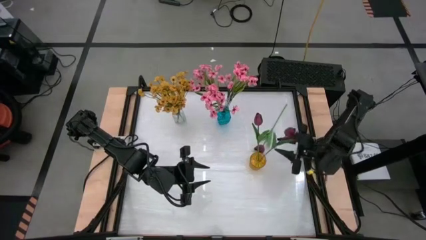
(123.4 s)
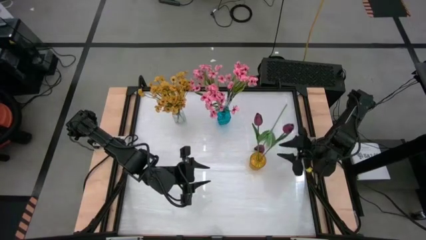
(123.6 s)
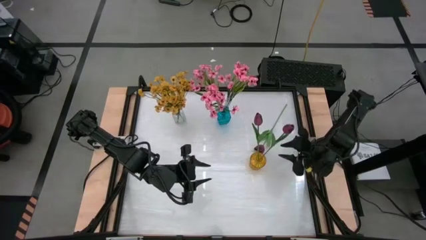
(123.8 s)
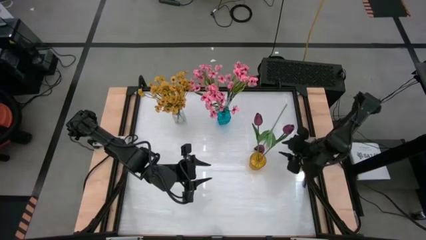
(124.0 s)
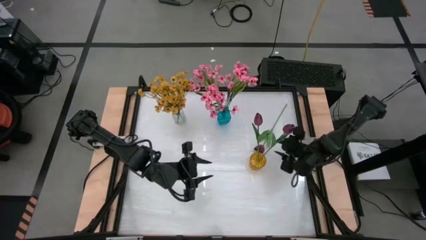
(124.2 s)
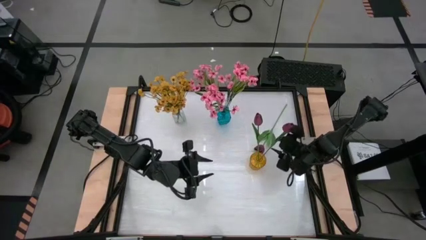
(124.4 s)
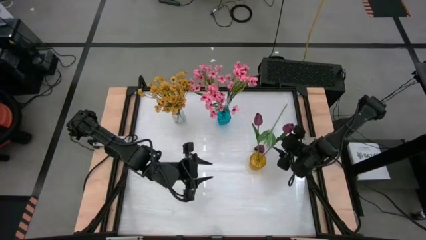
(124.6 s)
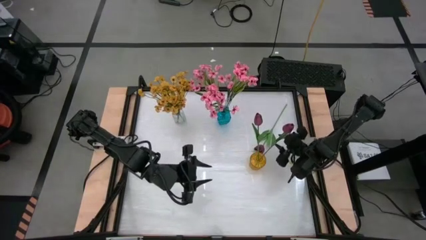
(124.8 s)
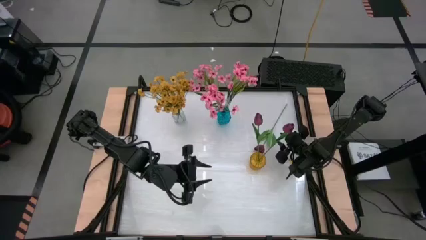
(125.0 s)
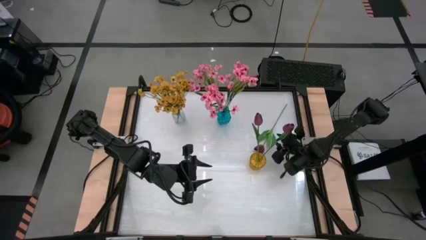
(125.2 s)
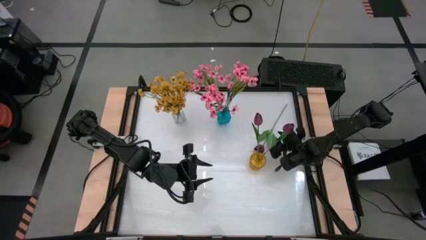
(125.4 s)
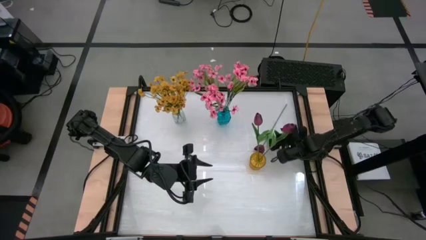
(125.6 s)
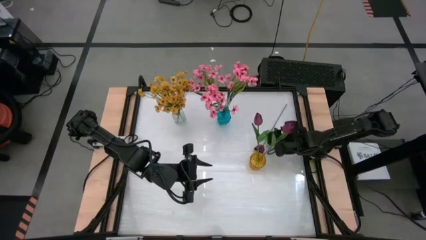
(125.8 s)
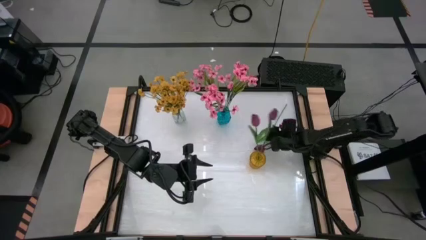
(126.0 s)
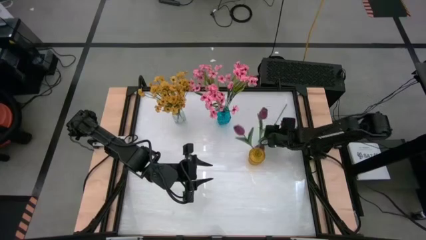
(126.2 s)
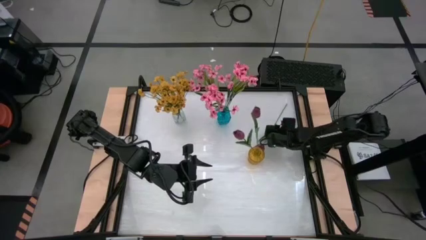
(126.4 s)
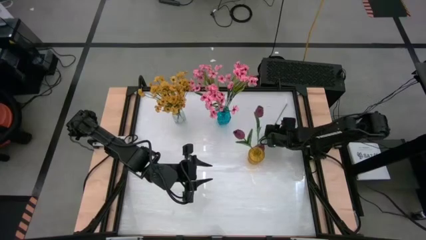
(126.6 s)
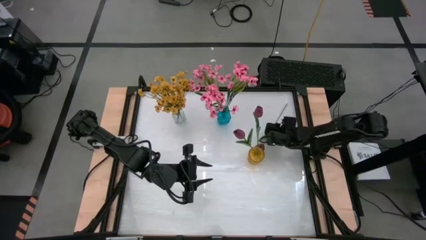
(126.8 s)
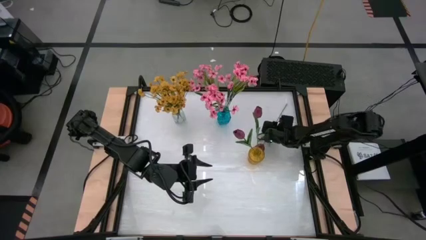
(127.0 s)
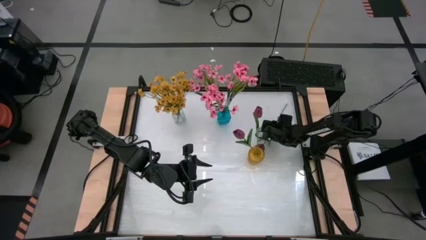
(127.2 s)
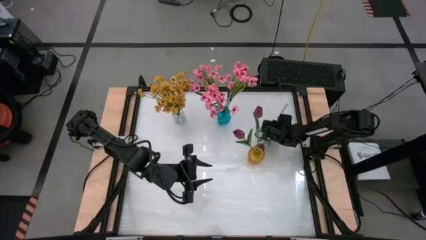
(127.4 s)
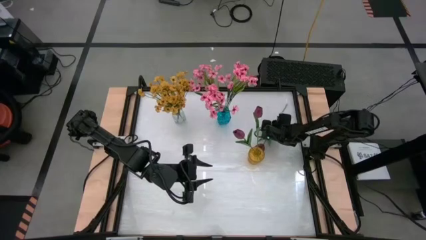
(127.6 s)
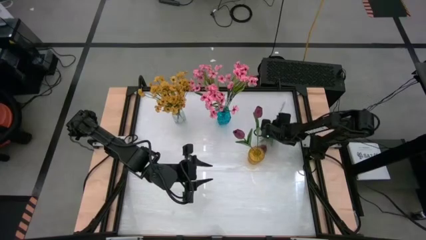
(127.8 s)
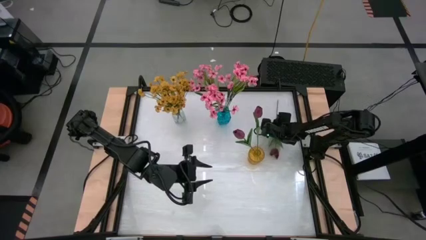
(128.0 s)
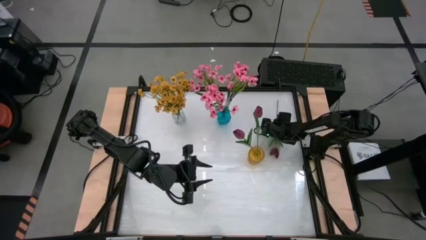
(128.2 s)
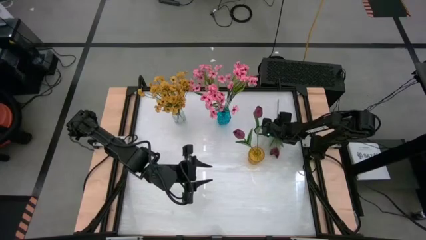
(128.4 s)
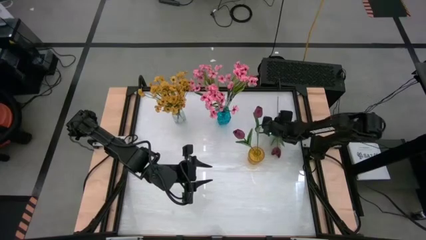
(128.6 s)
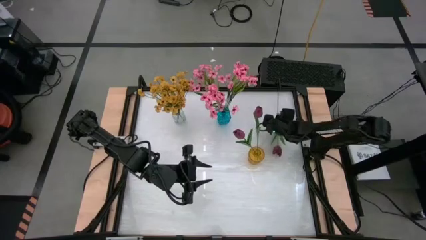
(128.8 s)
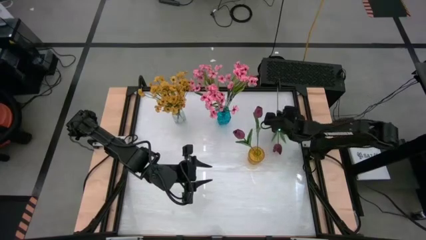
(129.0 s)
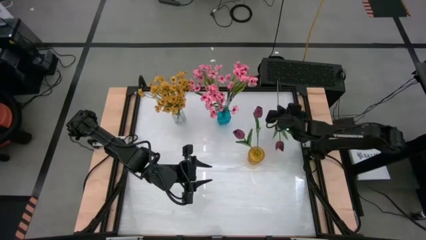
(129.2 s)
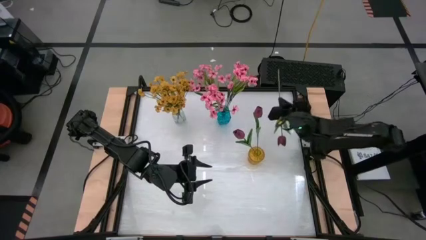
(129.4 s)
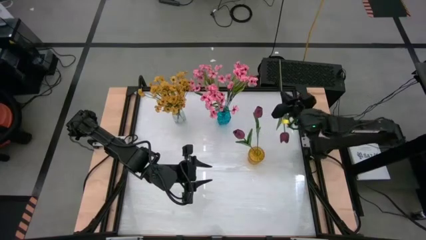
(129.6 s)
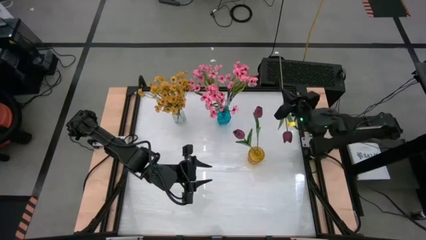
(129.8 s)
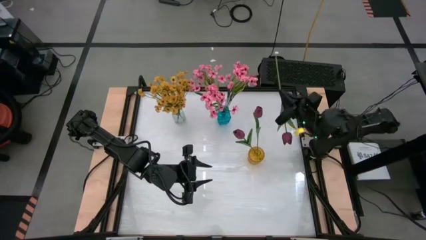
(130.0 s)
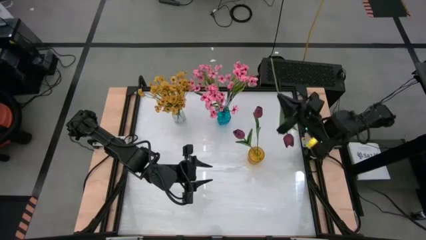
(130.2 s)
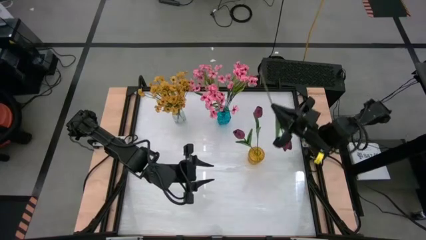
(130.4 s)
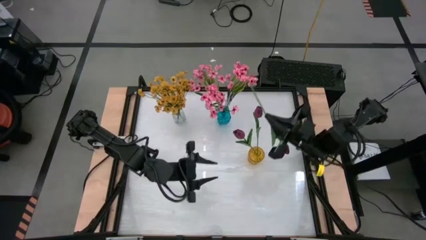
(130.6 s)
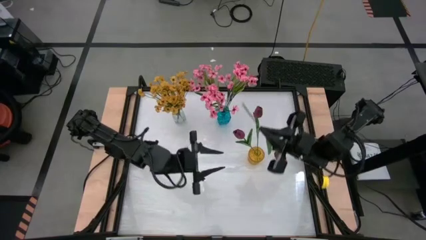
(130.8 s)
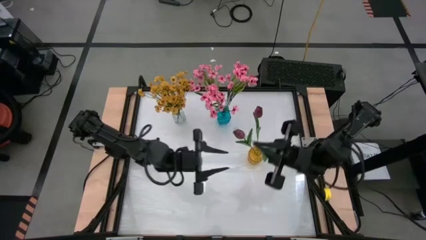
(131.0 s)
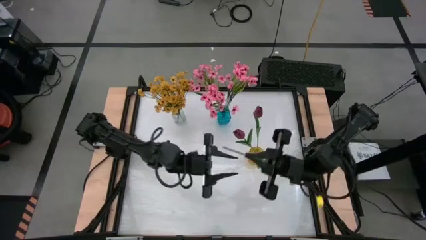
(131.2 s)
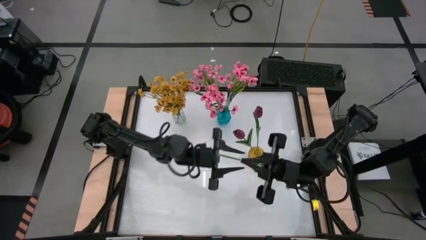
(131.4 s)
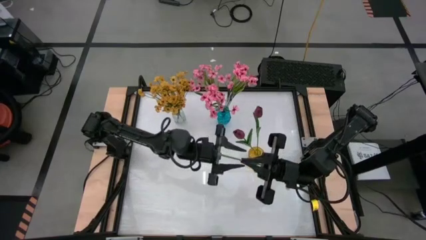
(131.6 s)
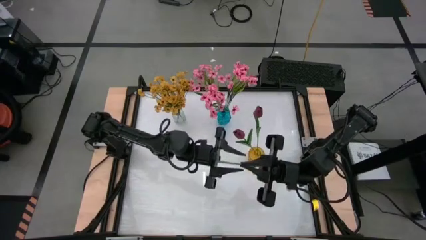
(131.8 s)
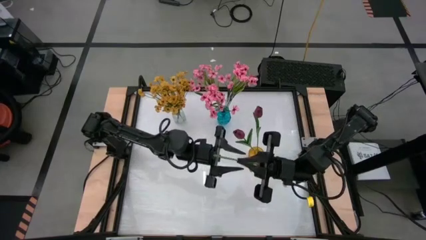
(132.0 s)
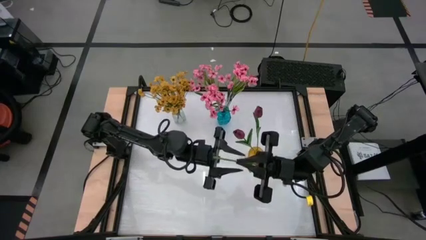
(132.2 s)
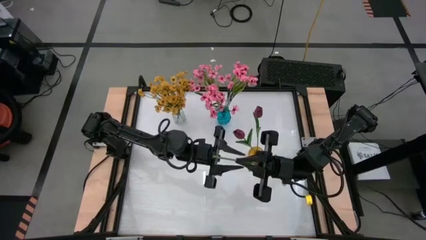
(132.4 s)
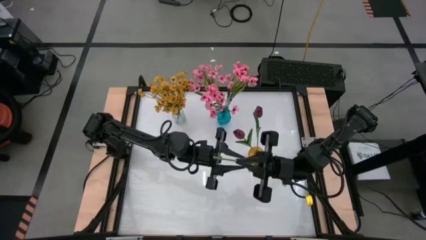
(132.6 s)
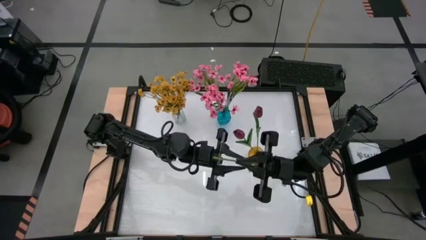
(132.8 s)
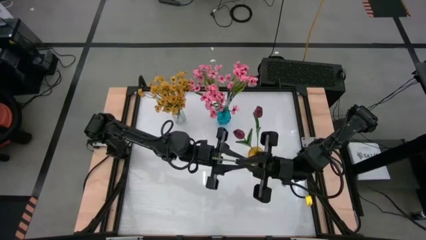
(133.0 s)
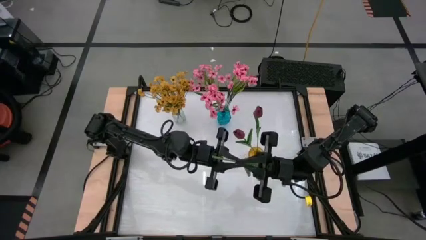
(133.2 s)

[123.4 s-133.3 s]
Task: Sort flowers into vase by color
Put the red flower into the yellow vase

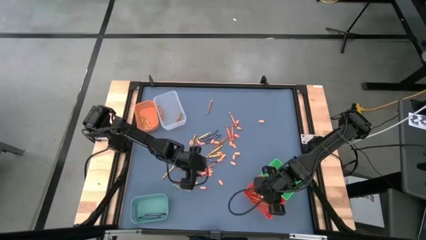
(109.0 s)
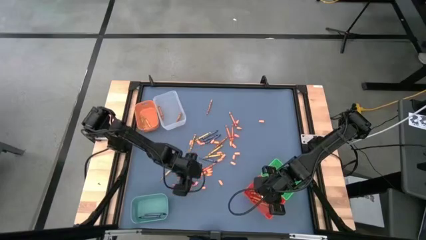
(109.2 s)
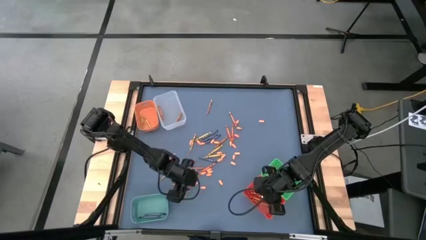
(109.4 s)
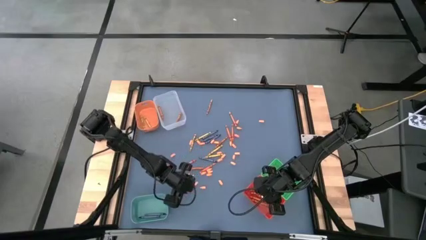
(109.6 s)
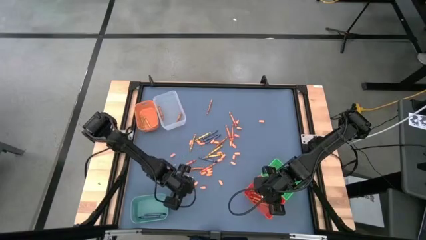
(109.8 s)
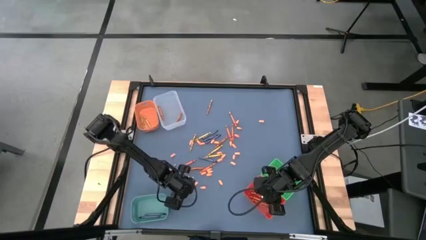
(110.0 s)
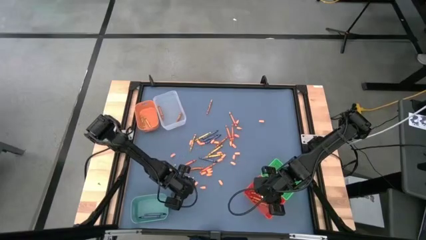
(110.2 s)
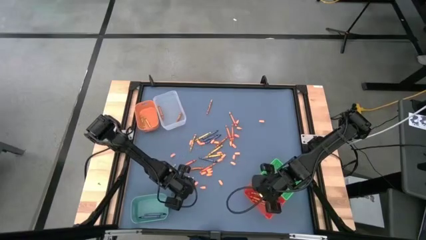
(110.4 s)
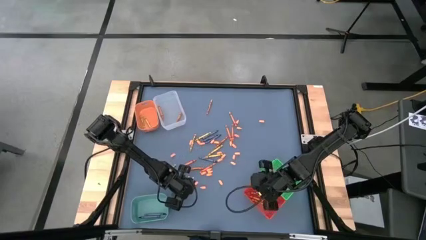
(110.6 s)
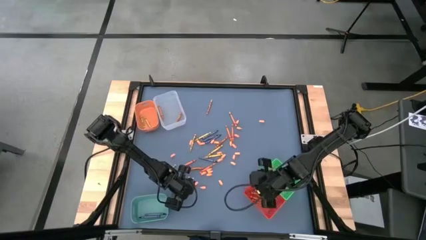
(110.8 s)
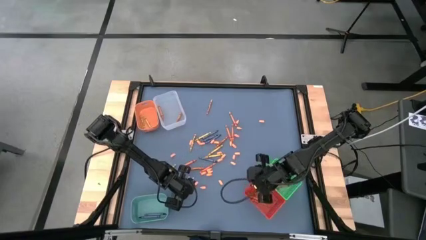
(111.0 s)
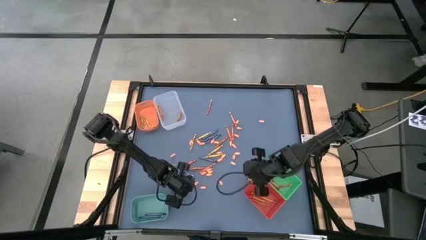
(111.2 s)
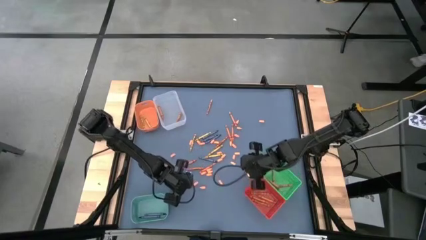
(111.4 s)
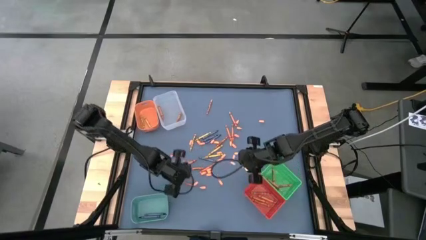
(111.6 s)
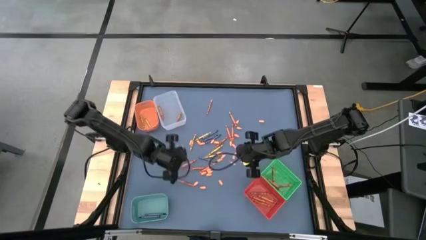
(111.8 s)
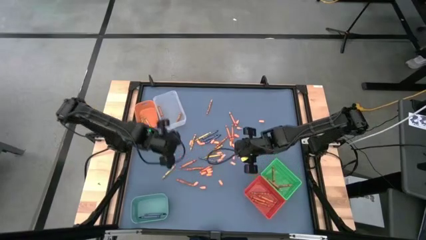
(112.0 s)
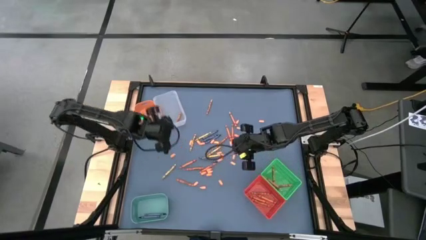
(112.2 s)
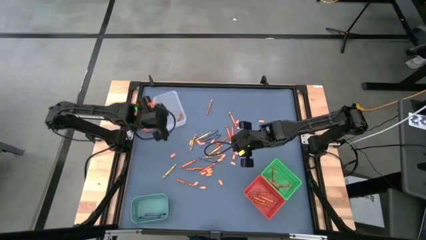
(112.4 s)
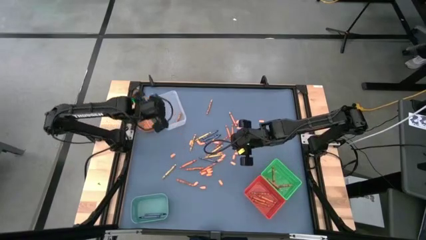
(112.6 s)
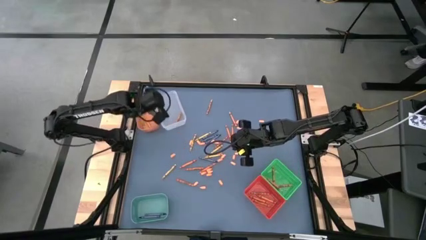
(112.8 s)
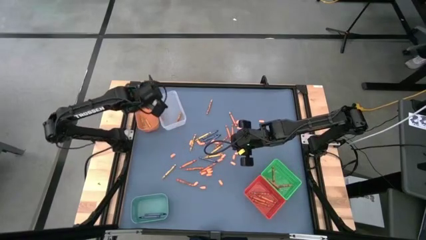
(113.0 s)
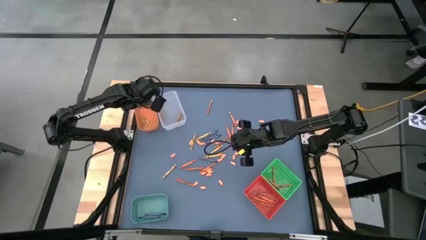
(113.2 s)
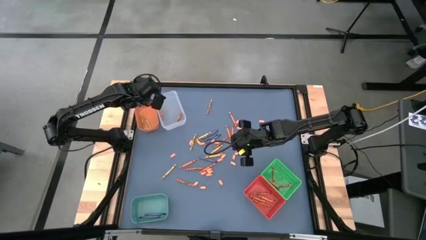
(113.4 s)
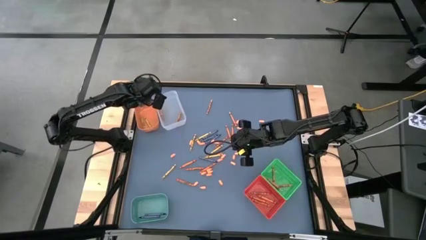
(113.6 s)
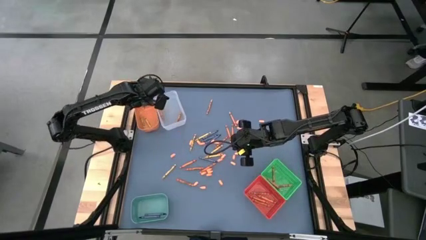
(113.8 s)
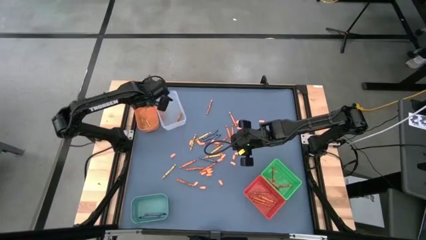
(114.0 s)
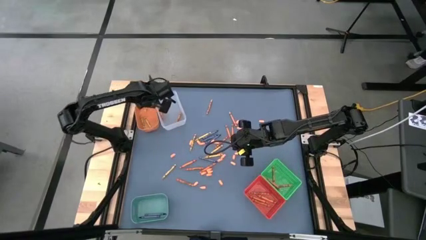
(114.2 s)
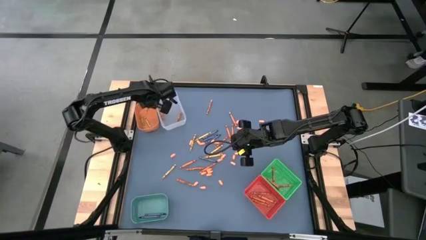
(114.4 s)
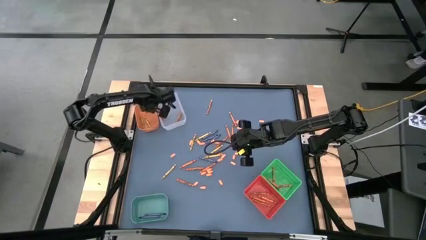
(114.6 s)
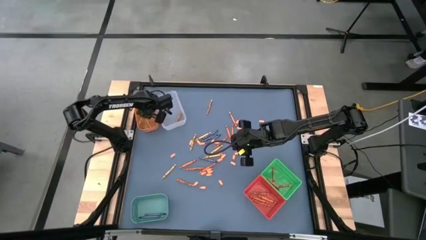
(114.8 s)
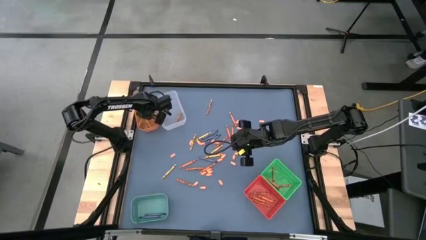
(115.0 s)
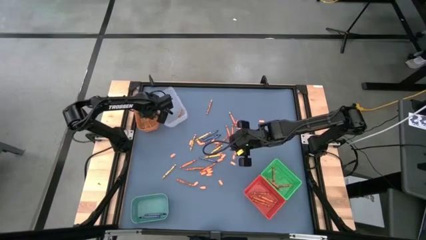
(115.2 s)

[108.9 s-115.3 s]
Task: Sort crayons
Put the yellow crayon into the orange bin
